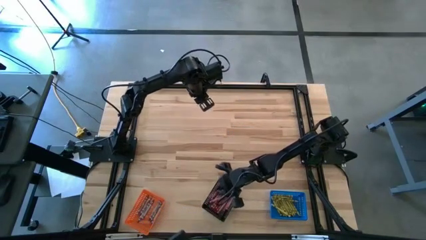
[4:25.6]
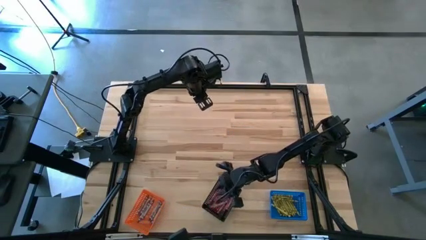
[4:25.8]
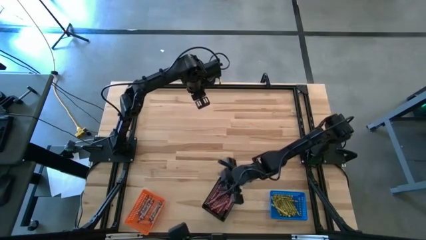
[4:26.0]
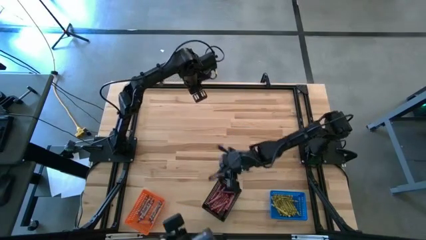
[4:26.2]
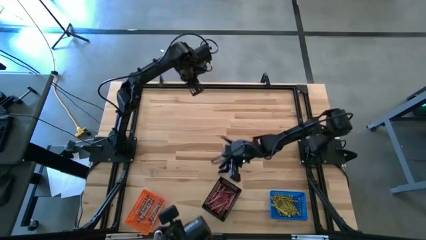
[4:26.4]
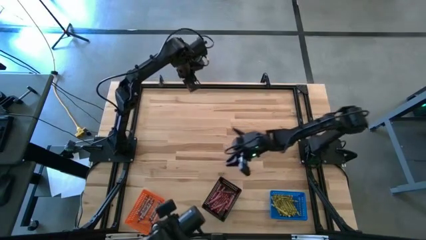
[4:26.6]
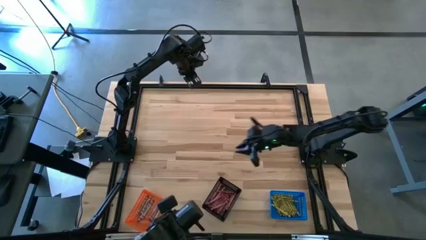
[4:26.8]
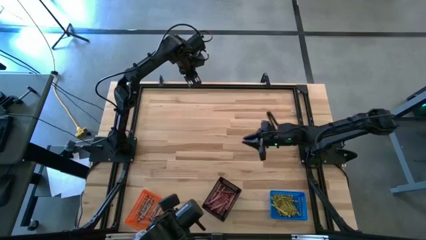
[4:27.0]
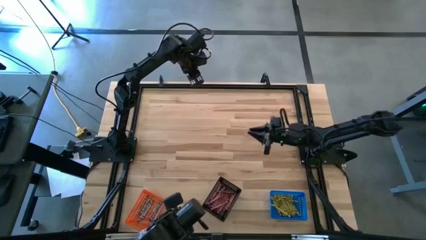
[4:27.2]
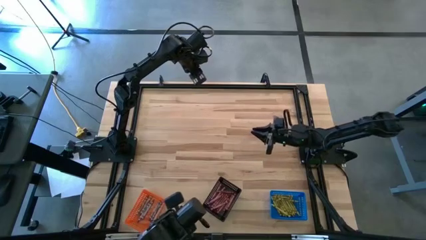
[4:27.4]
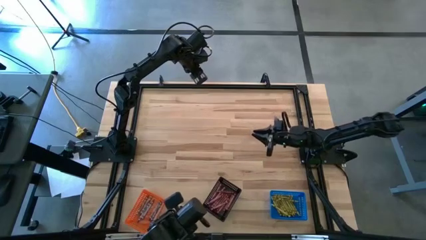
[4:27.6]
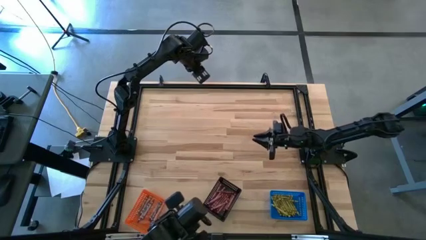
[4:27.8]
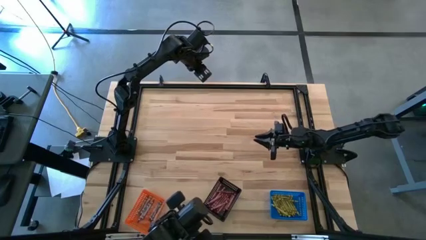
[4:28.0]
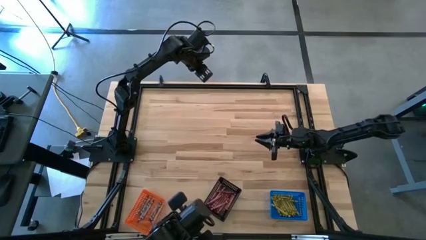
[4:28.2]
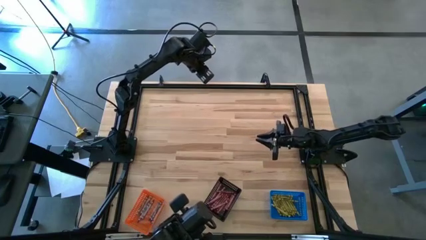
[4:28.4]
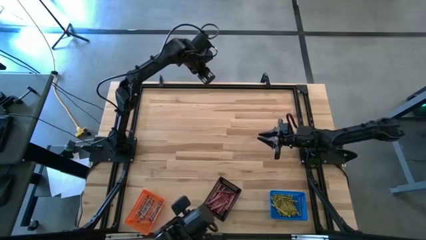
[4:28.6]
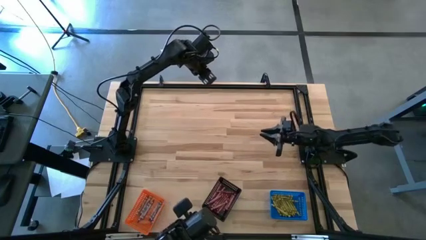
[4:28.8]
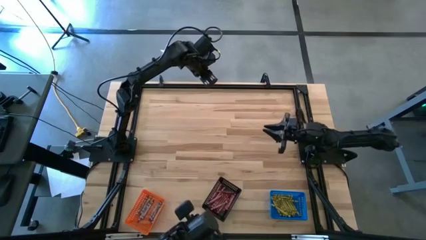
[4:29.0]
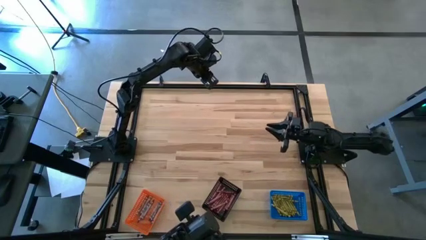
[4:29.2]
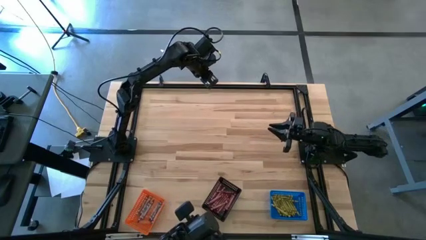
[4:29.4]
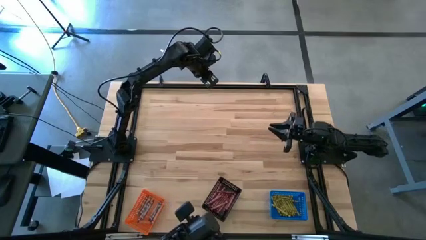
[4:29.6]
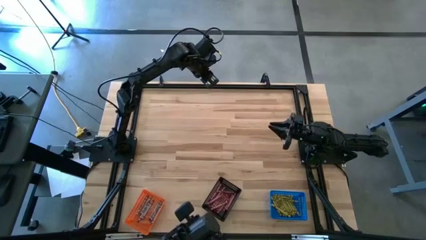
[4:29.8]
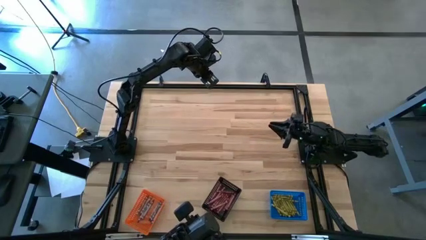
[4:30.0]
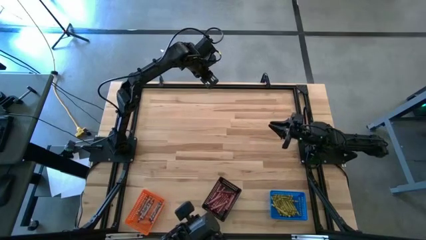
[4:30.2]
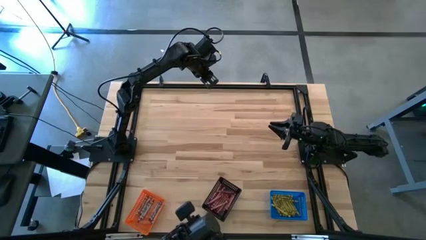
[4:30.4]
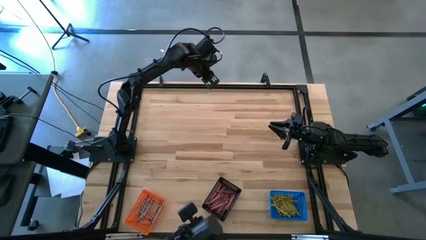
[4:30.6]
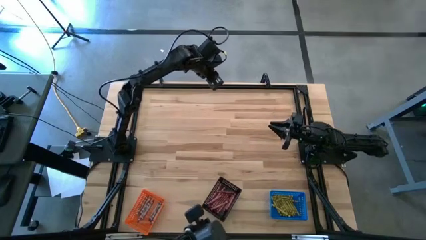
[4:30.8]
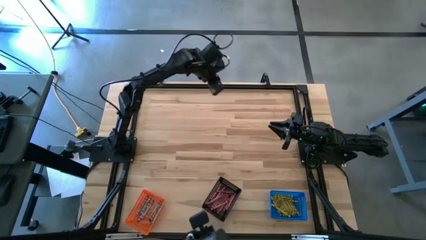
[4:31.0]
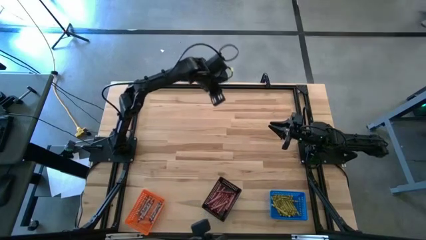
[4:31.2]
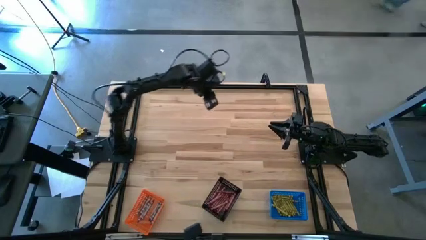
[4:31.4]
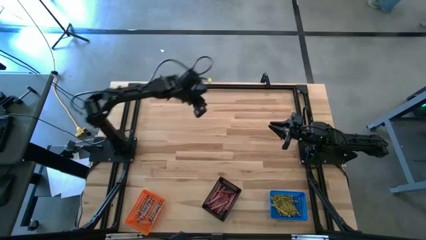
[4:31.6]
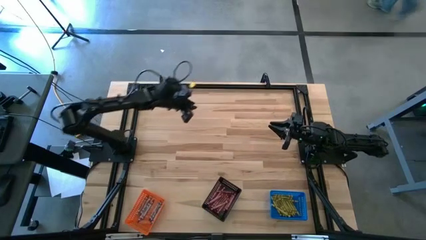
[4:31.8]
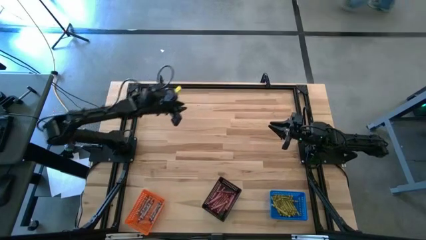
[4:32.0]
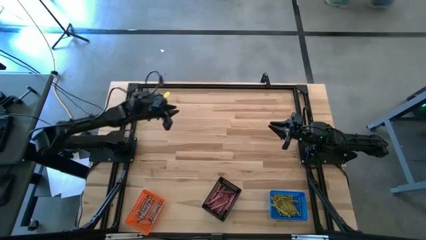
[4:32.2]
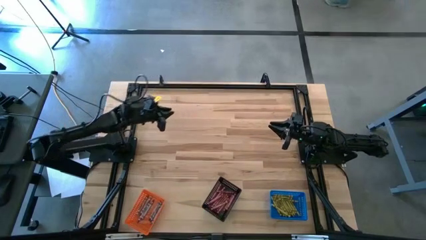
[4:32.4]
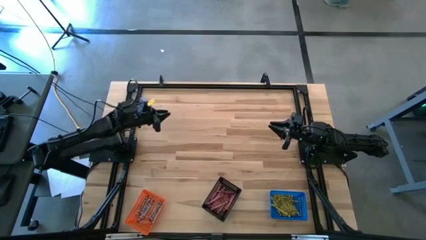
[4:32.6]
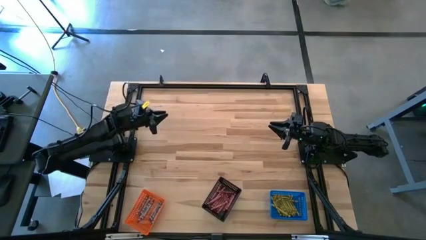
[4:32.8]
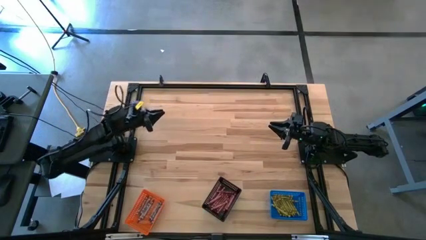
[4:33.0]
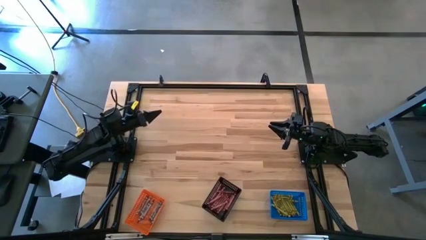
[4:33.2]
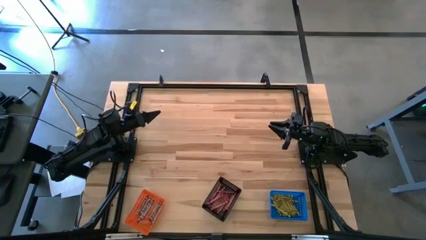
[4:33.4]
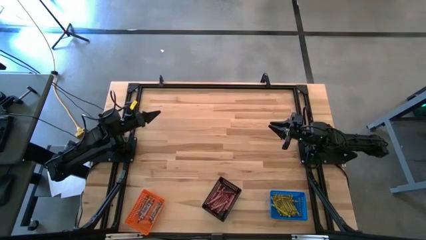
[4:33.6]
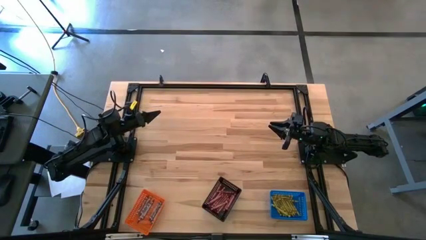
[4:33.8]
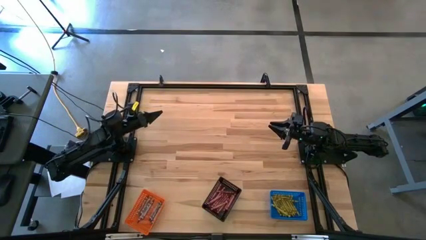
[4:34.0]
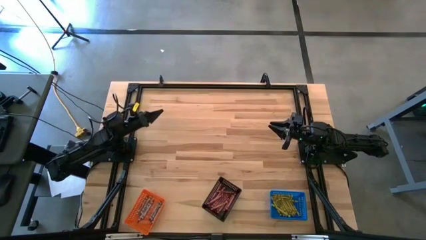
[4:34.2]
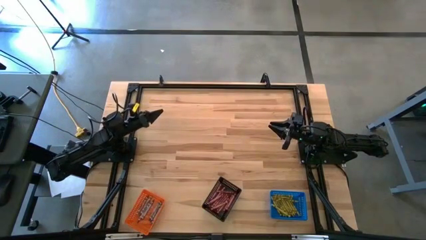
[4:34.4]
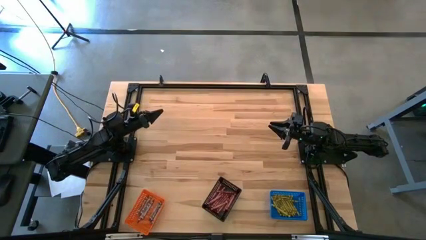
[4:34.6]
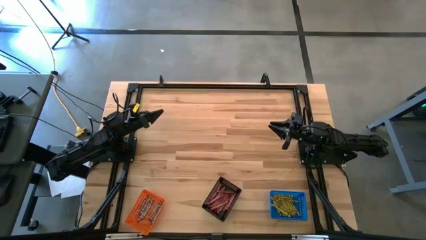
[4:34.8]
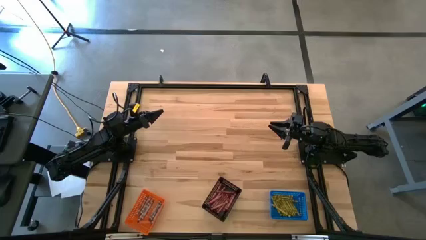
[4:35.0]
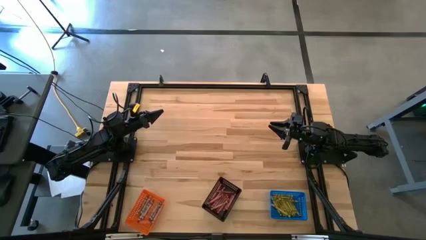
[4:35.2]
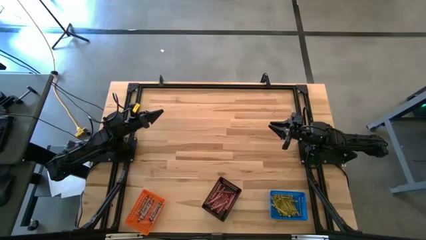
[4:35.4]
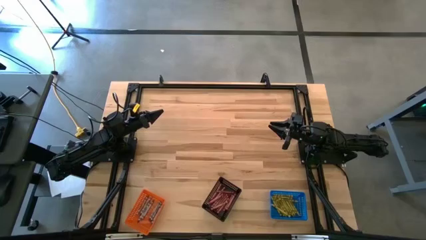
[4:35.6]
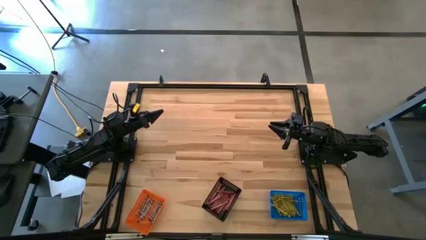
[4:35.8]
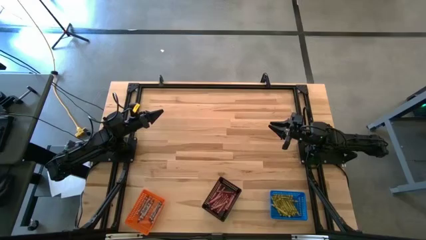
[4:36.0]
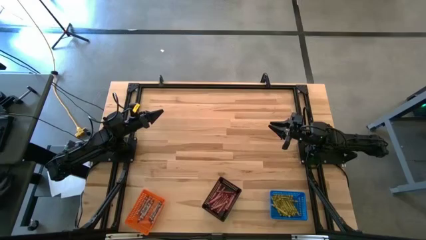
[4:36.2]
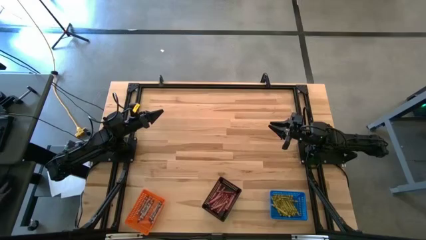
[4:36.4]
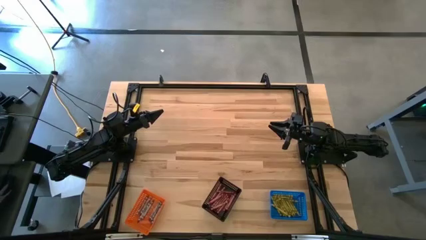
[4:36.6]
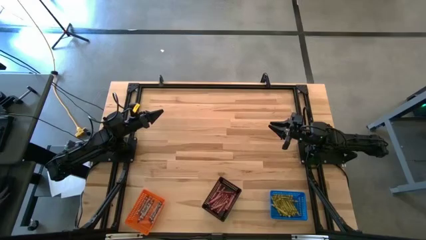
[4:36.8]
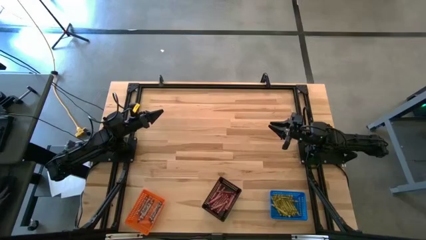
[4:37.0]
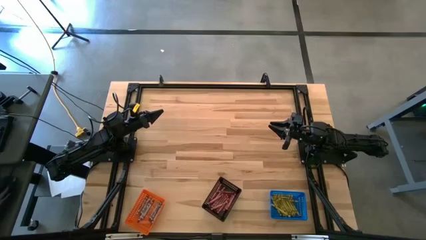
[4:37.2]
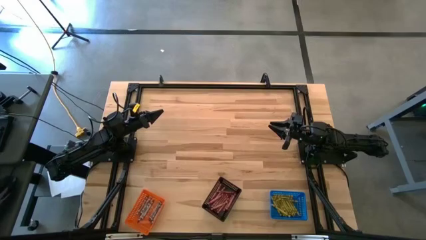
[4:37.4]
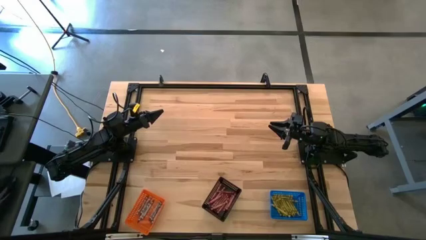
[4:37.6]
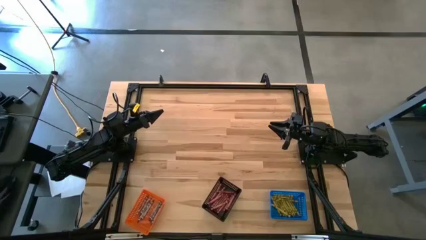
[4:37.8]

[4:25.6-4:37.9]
Task: Sort crayons
Return to Home Position

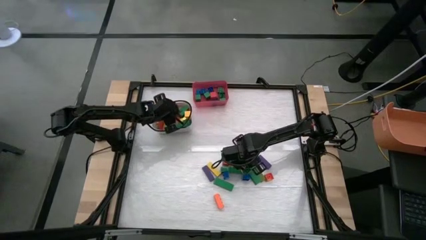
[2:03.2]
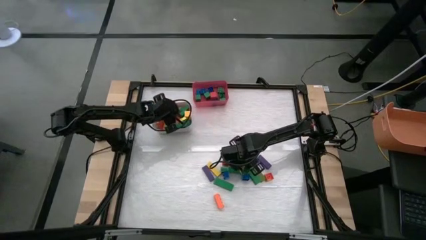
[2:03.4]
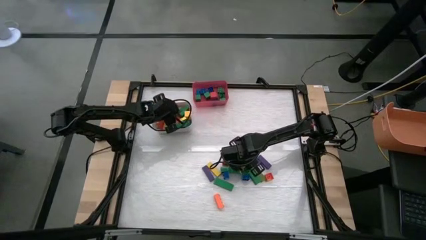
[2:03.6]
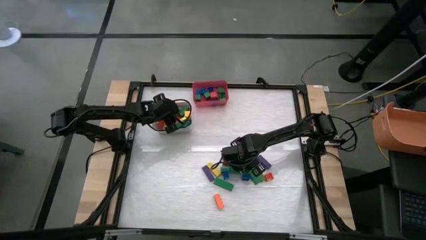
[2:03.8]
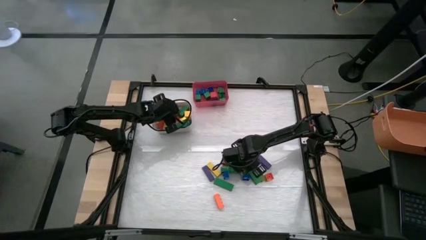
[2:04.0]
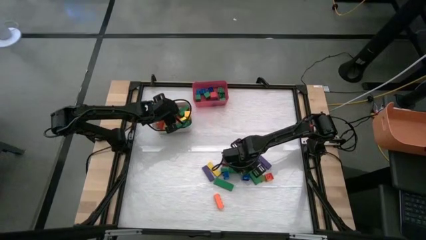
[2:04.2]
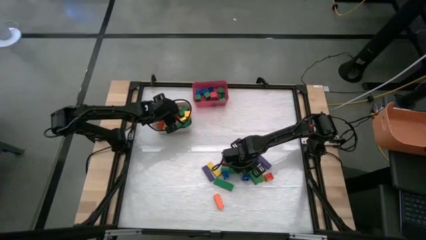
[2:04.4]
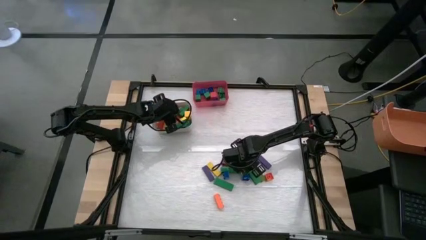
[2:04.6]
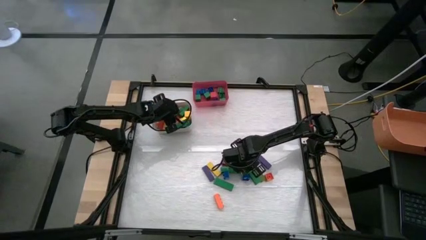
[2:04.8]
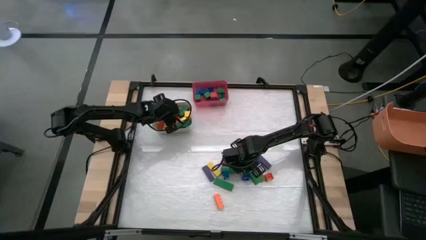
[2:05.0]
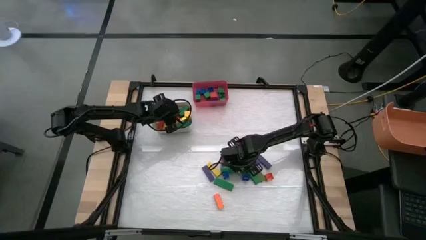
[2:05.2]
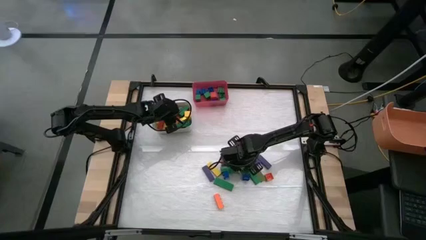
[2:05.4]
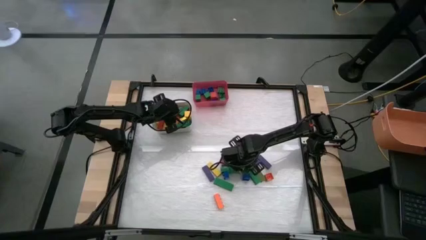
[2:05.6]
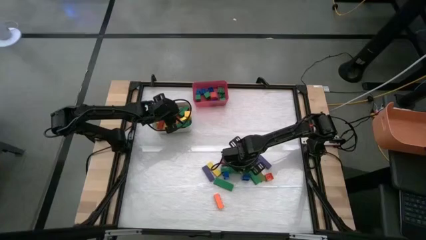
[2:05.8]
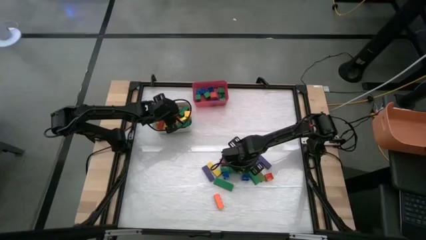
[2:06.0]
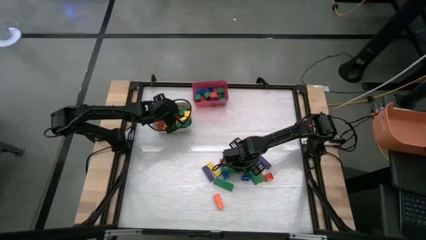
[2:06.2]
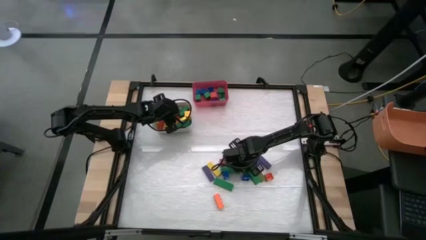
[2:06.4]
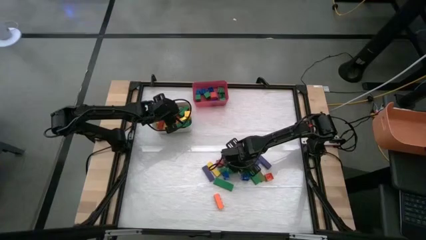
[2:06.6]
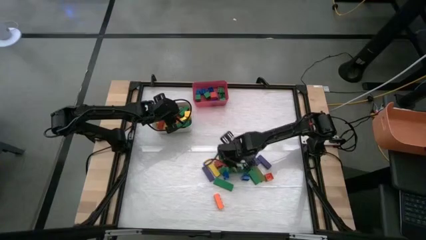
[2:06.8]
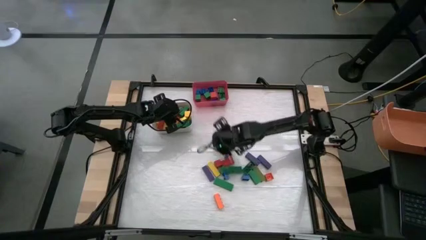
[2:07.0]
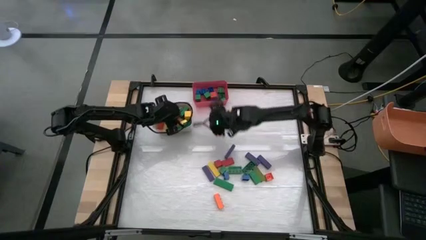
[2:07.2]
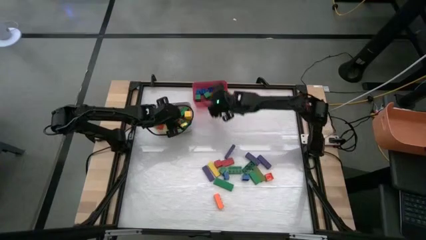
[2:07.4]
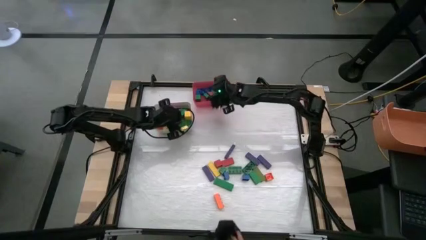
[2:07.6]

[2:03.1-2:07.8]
Task: Sort blocks by size
Put the small green wooden block into the red bin
